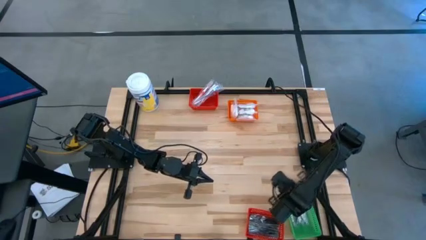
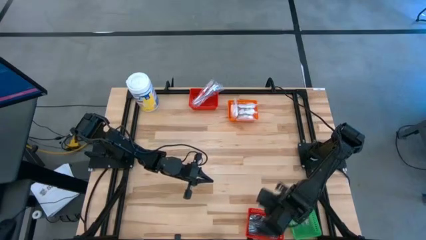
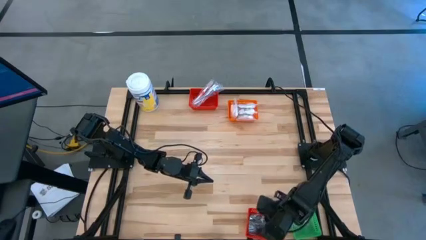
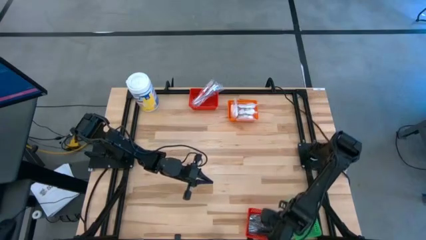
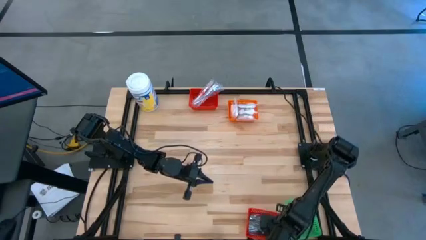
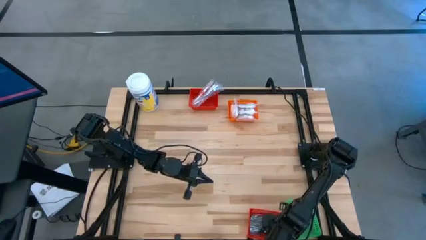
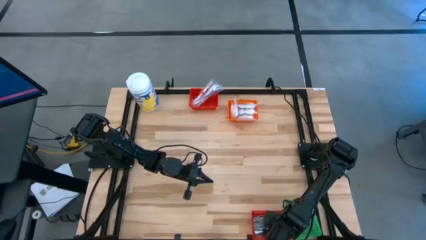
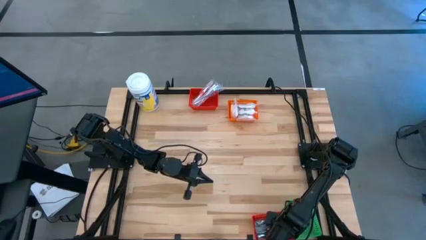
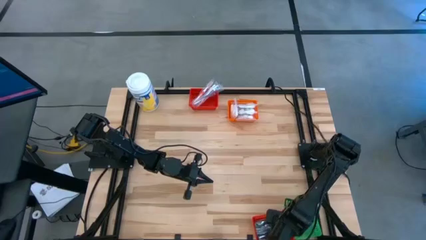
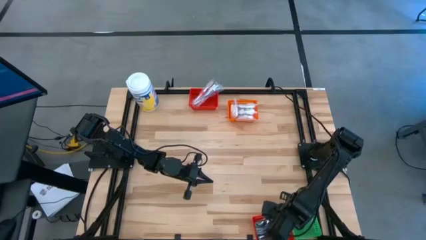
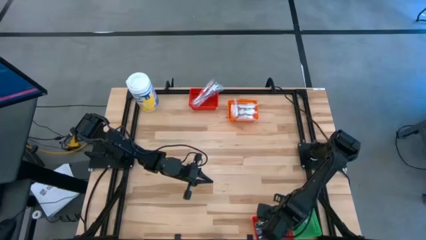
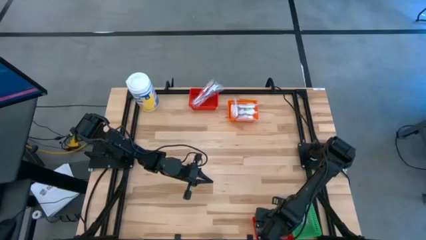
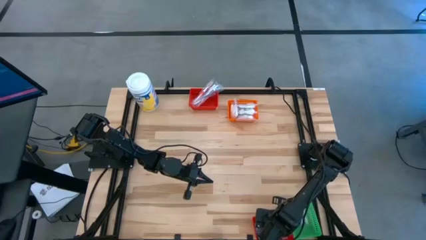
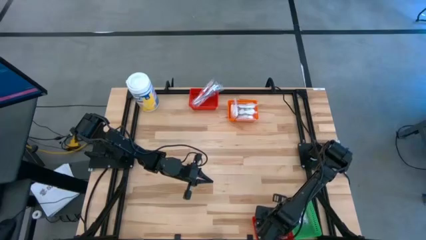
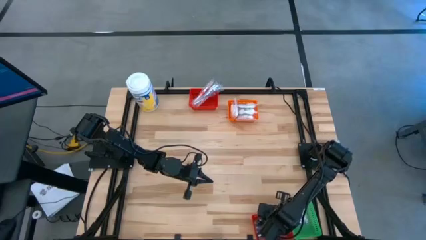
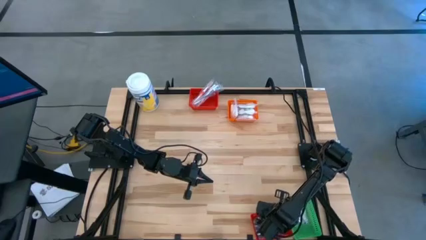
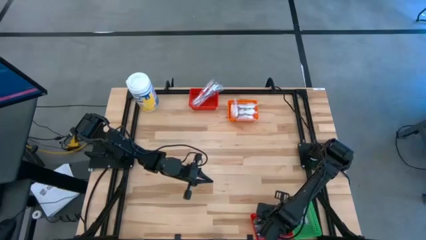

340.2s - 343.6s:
Task: Pick & Place Travel size toiletries
Adjust the bottom red bin

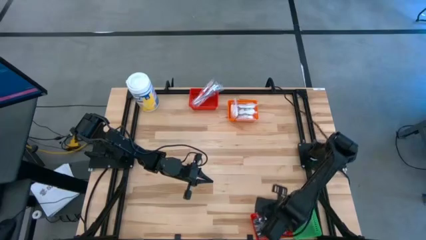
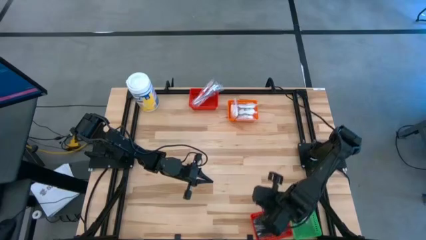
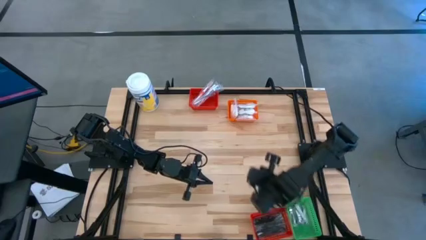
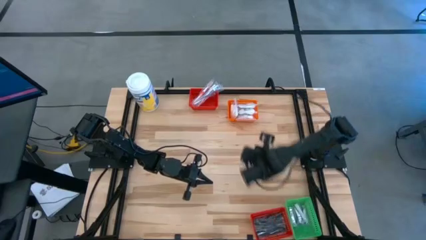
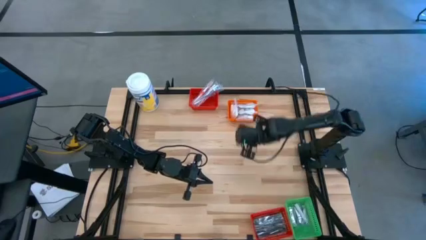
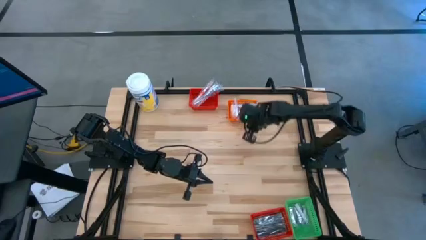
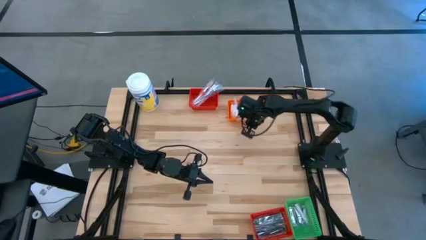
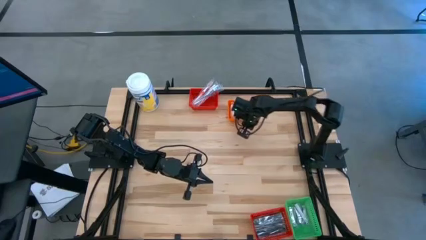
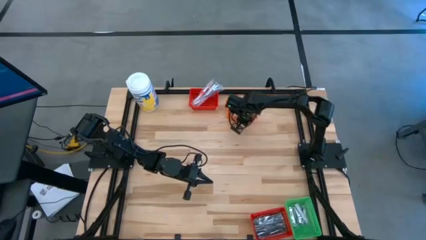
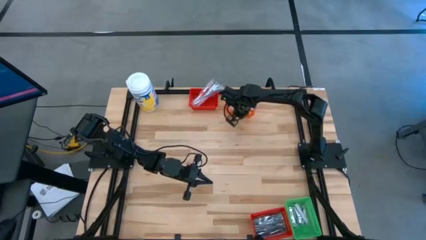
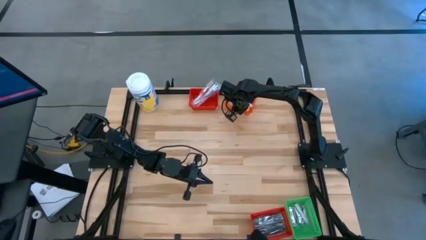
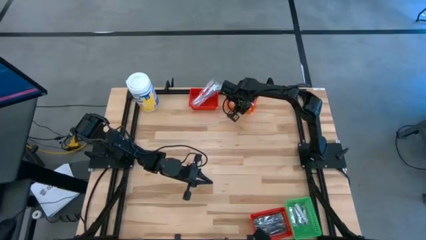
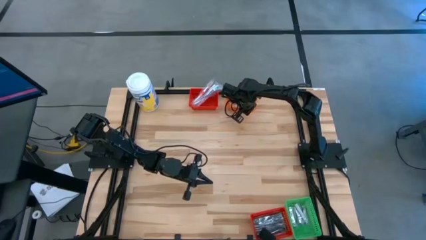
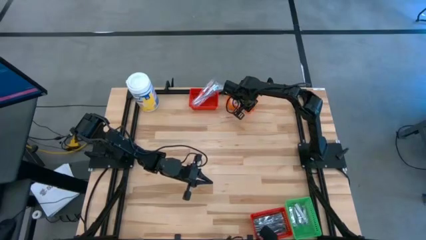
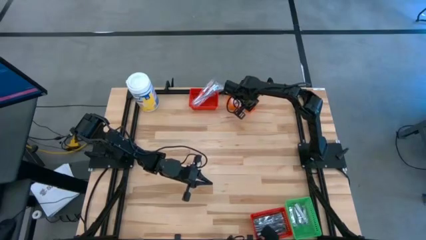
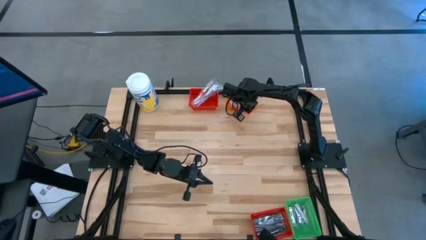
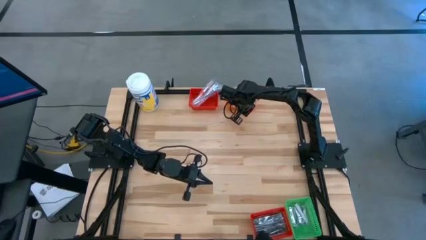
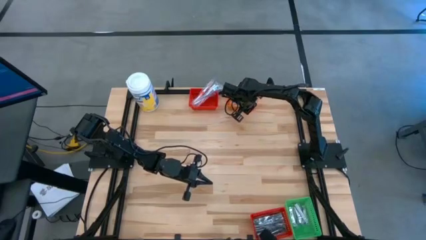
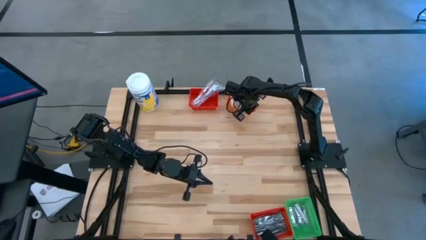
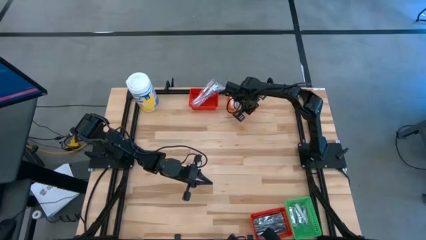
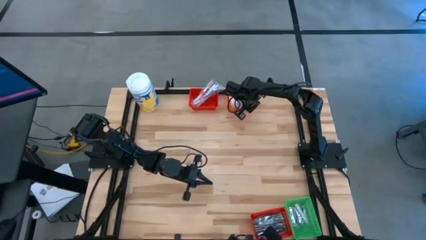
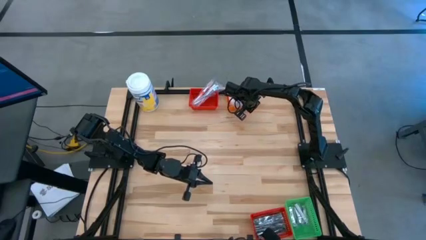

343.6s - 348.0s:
Adjust the orange bin

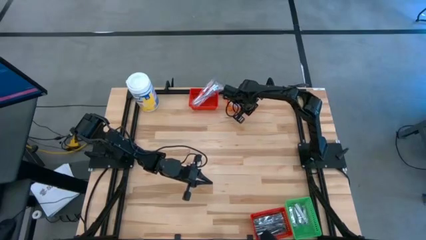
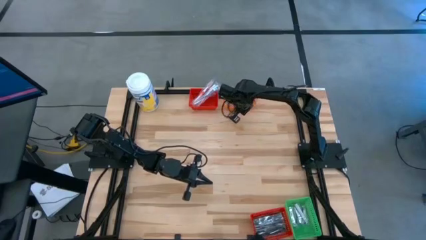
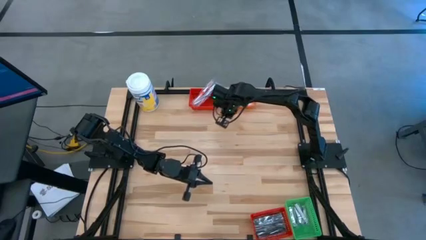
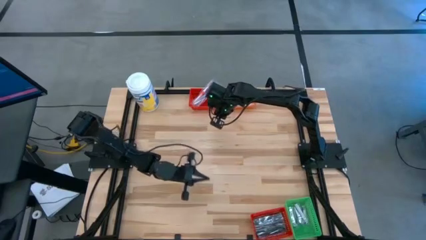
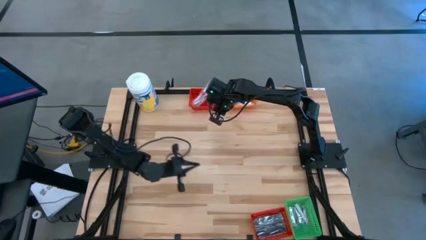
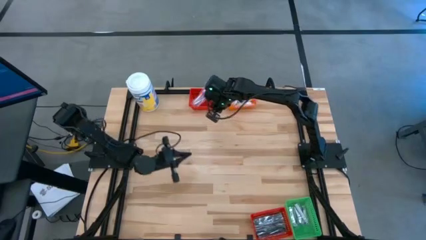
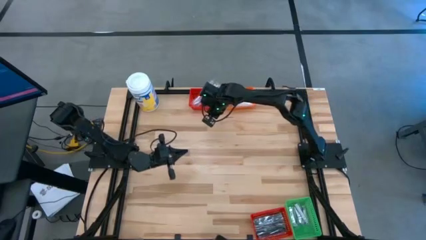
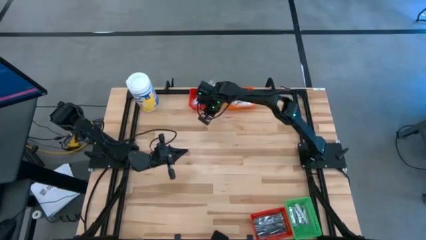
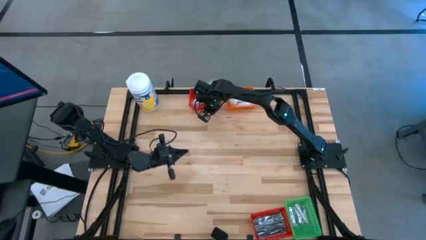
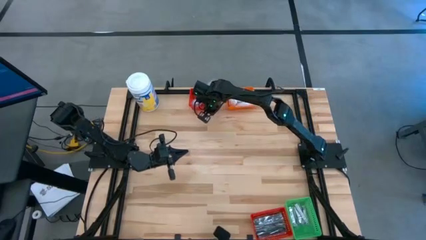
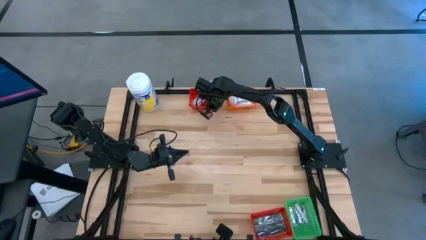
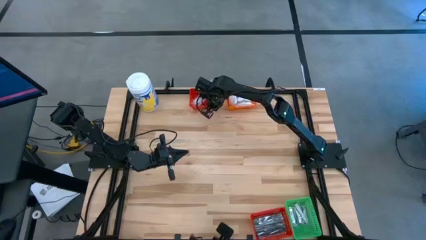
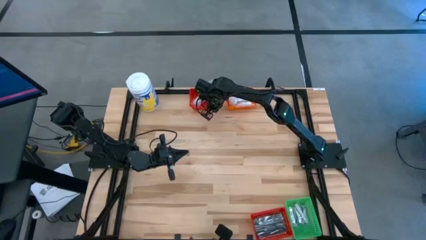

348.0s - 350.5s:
Adjust the top red bin

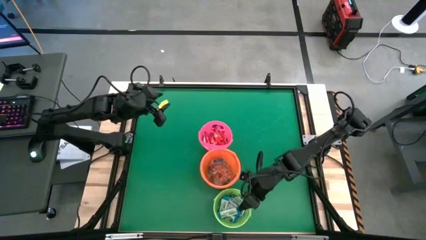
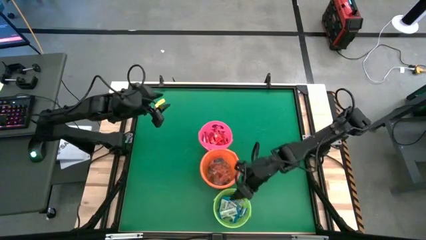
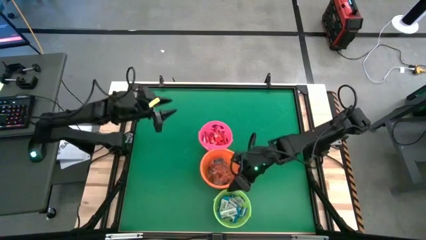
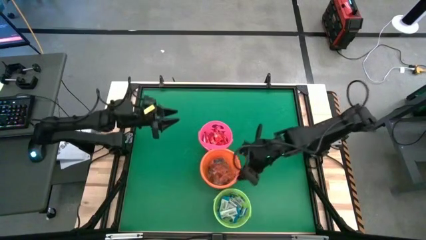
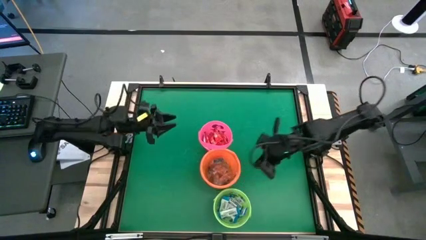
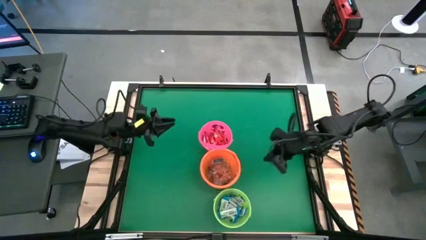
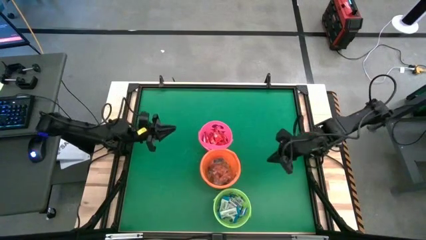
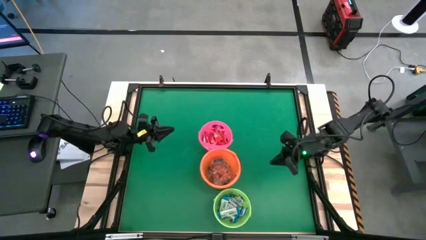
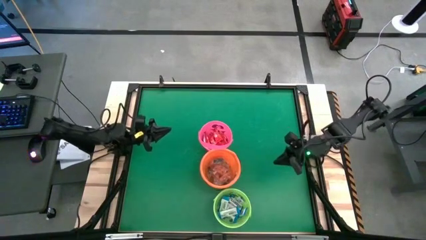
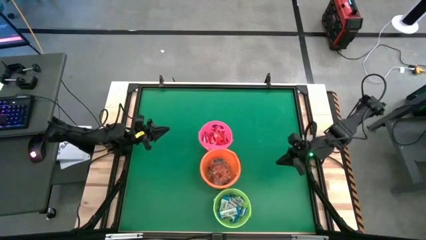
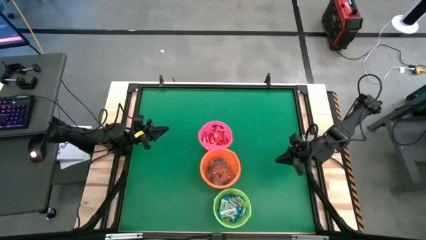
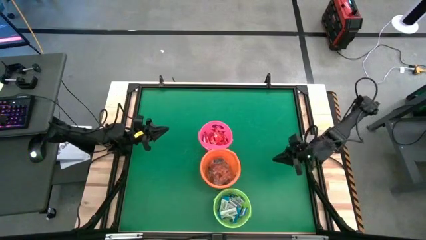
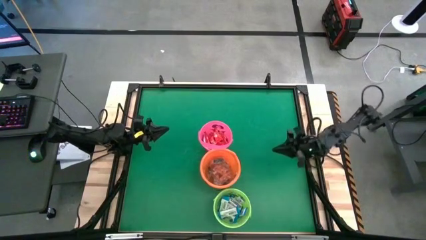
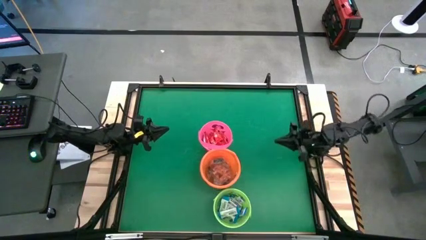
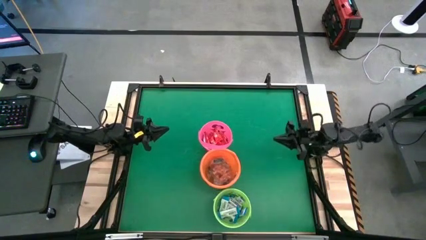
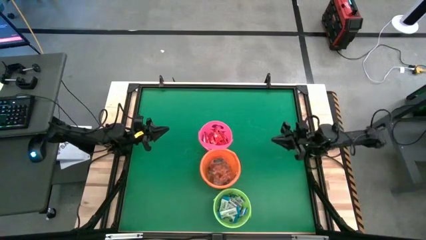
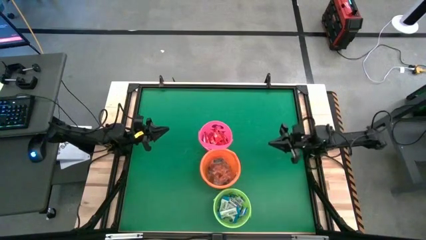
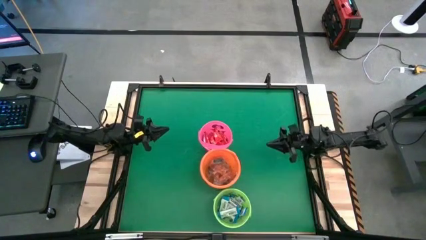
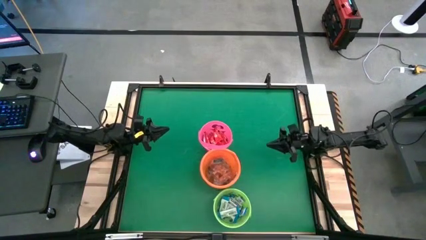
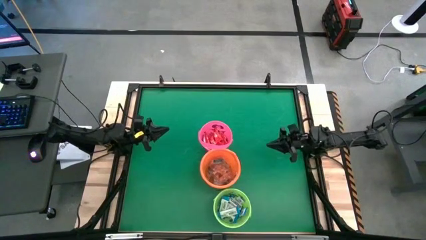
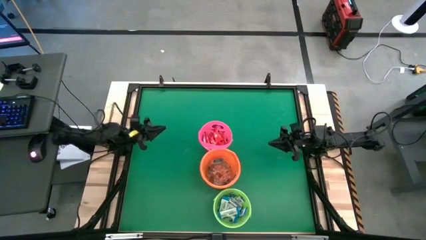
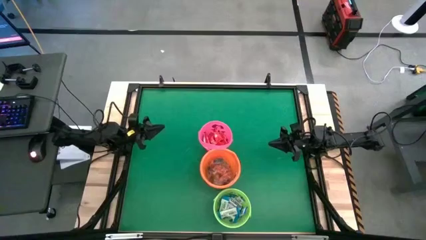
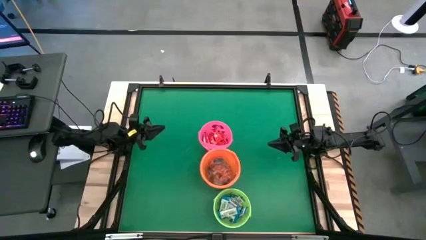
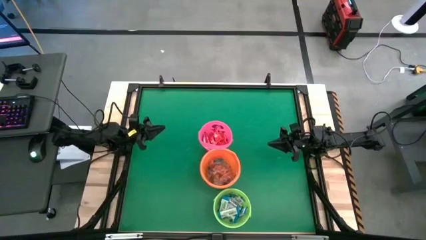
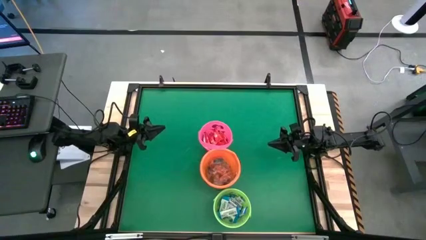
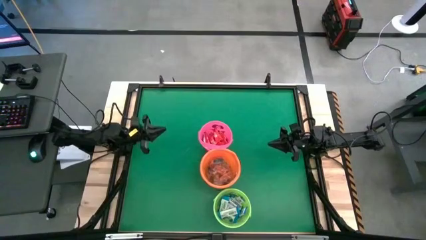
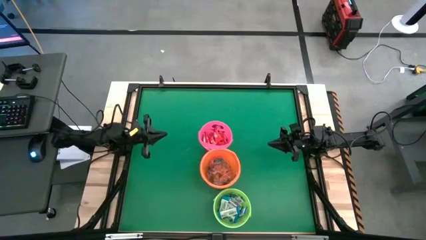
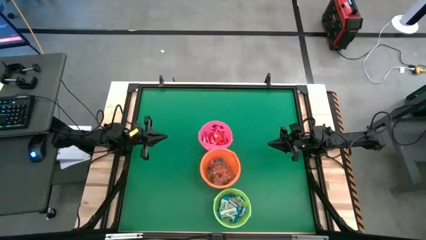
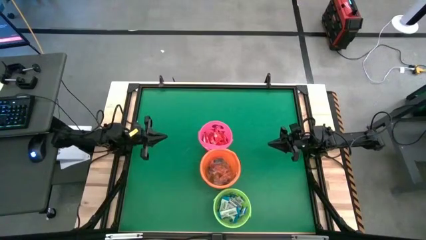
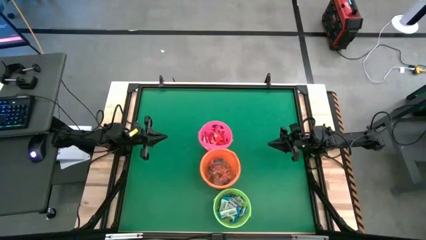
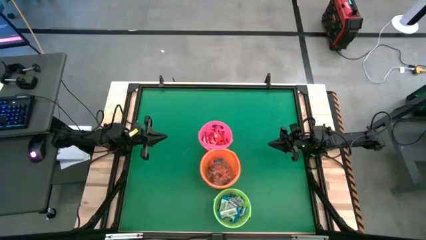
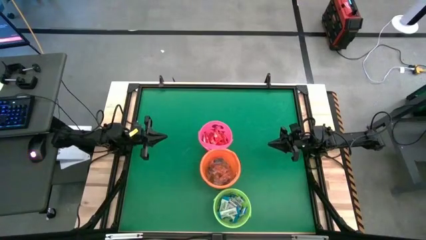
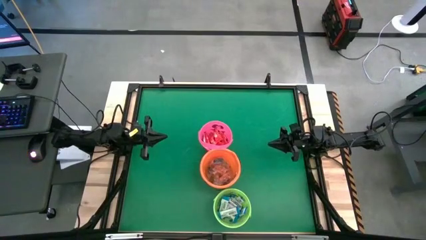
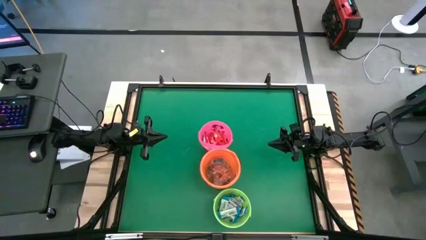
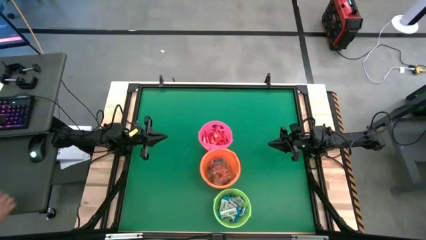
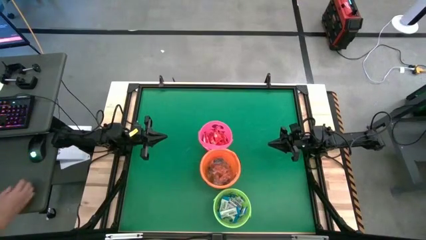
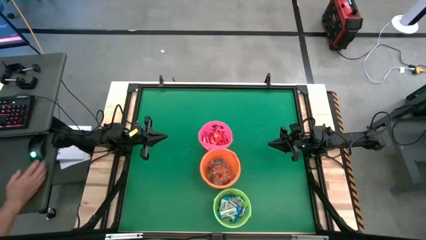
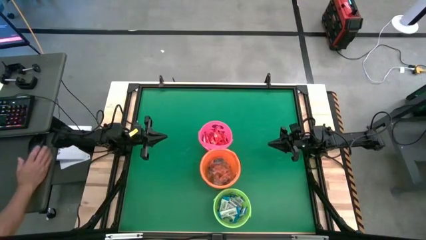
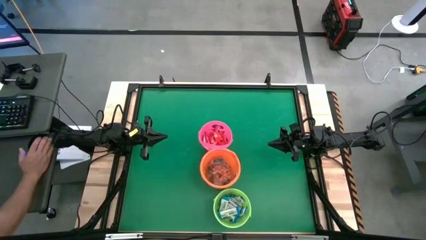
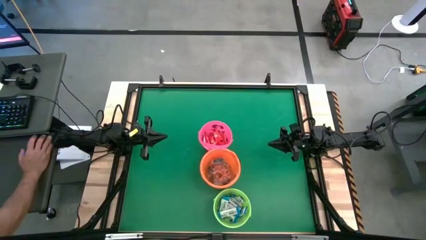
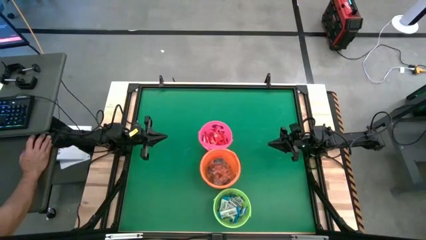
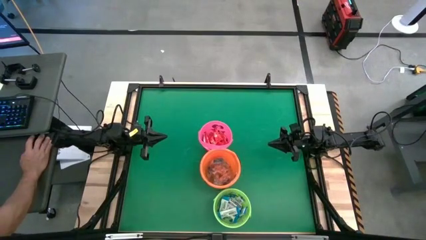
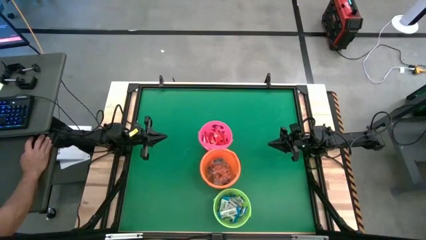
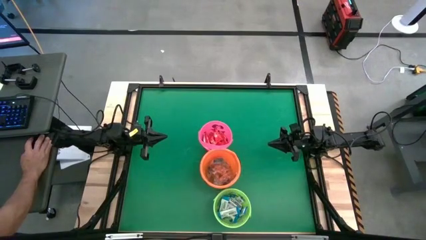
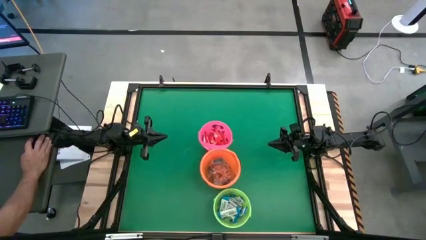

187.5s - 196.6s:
Task: Sort candy by brand, put in halloween buckets
Return to Home Position
